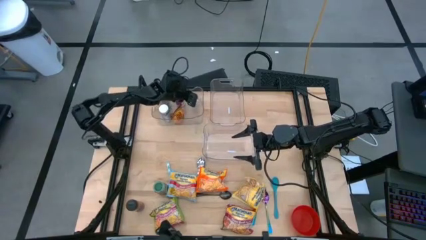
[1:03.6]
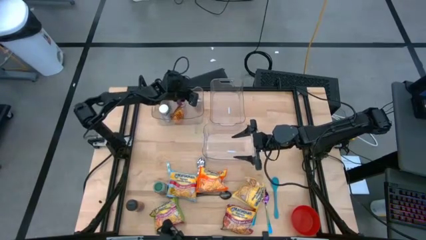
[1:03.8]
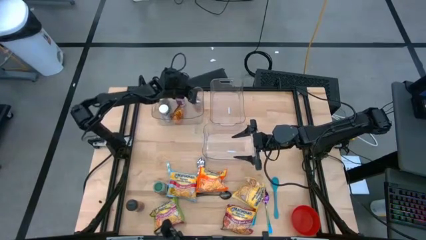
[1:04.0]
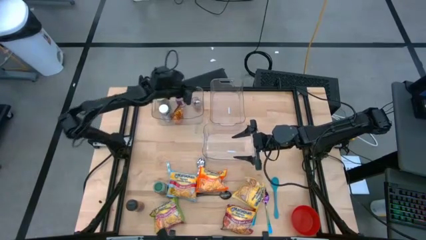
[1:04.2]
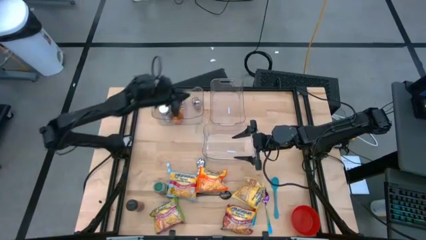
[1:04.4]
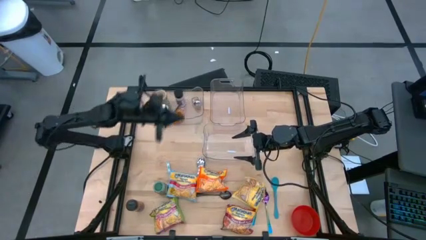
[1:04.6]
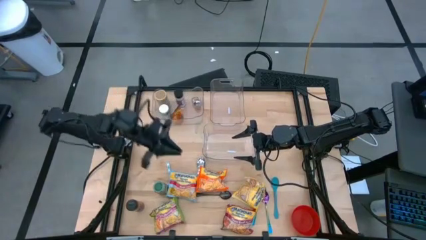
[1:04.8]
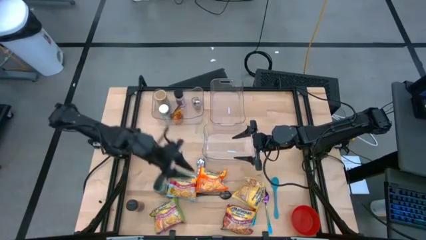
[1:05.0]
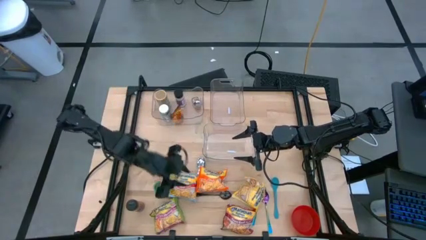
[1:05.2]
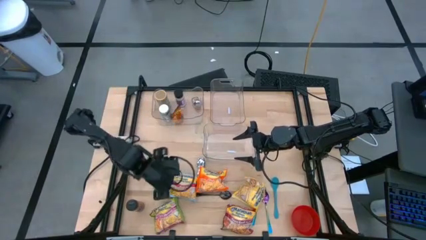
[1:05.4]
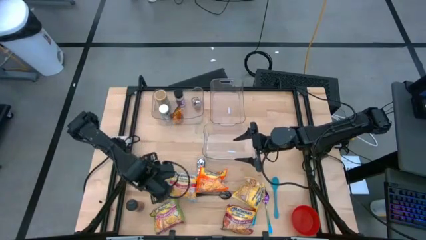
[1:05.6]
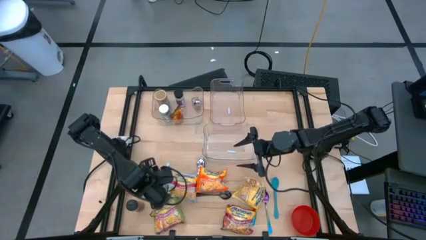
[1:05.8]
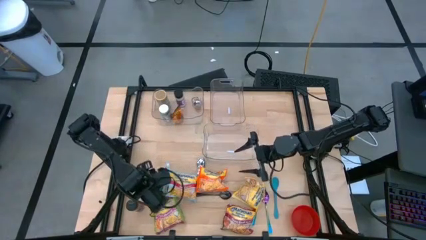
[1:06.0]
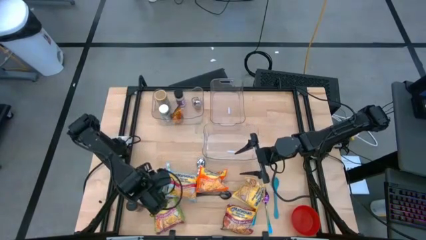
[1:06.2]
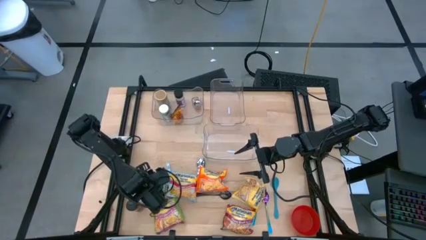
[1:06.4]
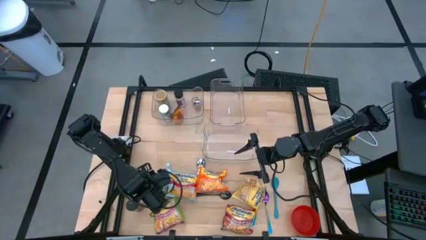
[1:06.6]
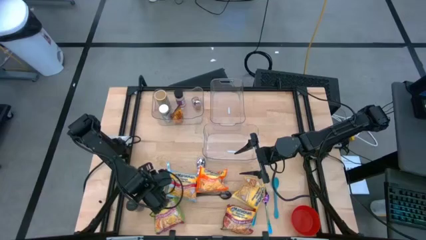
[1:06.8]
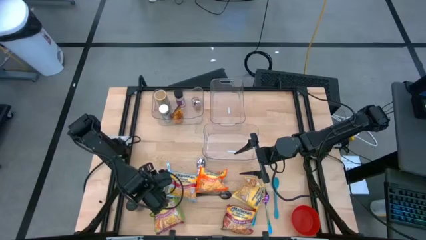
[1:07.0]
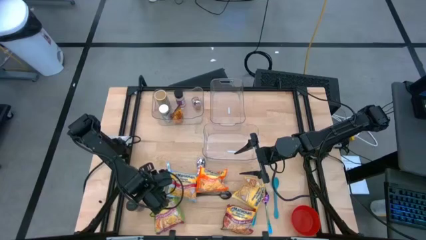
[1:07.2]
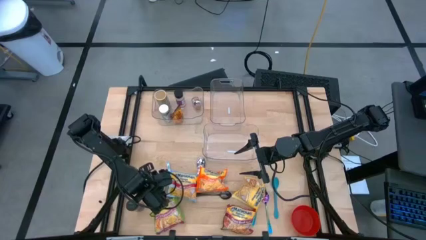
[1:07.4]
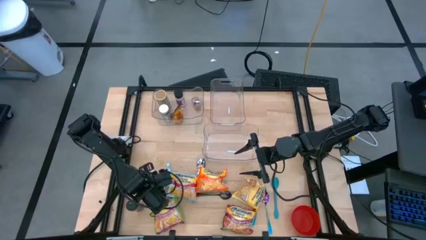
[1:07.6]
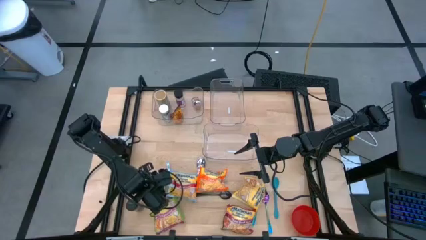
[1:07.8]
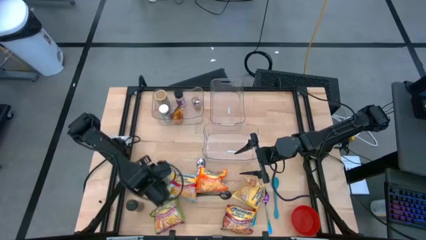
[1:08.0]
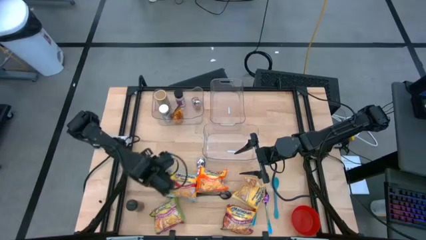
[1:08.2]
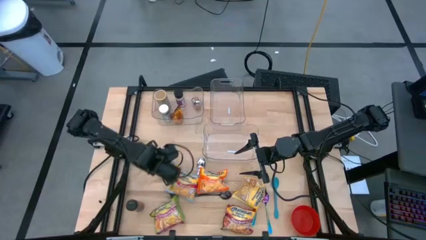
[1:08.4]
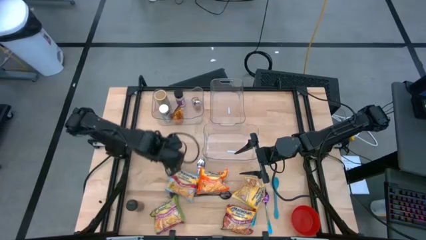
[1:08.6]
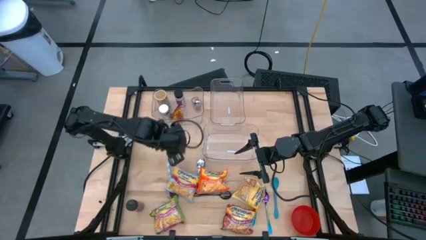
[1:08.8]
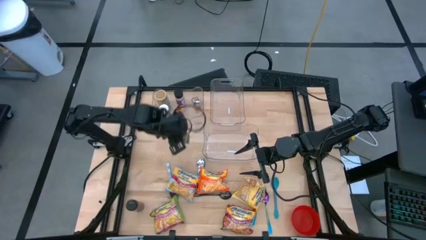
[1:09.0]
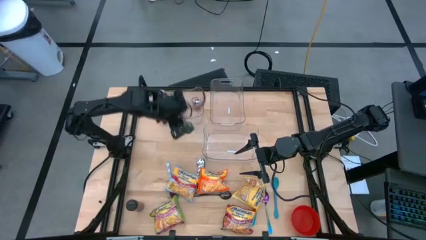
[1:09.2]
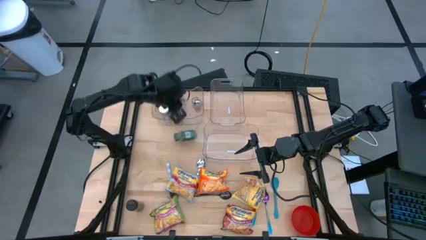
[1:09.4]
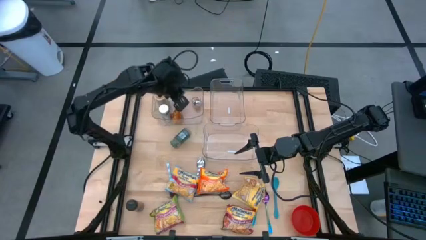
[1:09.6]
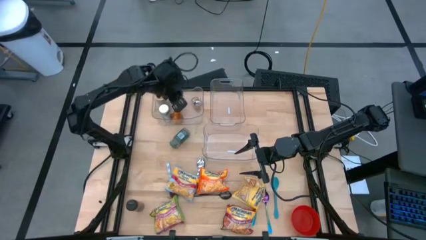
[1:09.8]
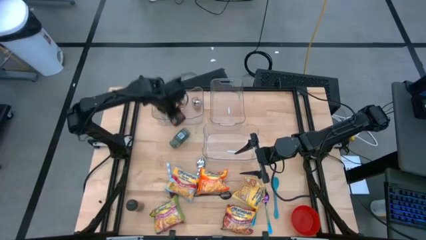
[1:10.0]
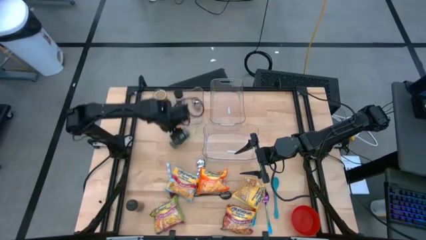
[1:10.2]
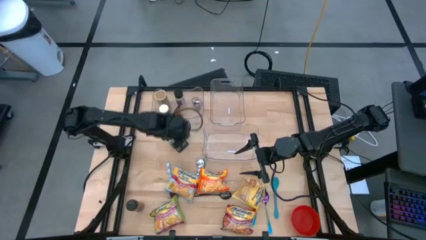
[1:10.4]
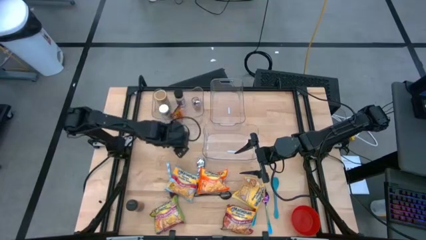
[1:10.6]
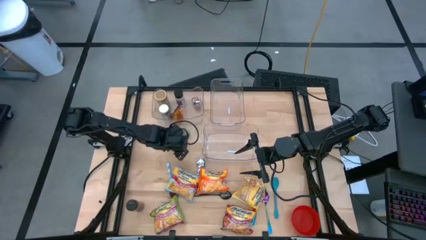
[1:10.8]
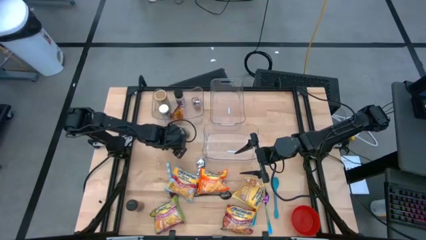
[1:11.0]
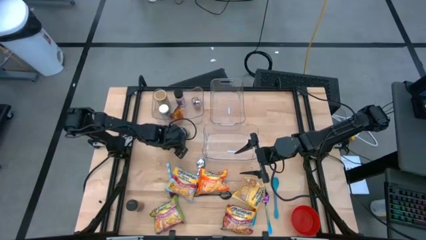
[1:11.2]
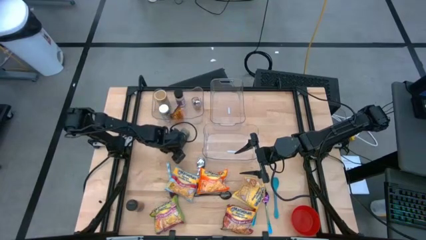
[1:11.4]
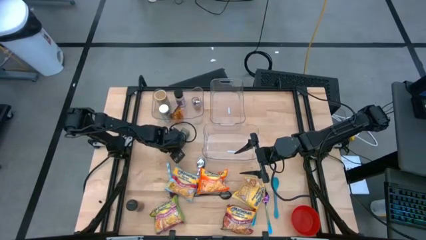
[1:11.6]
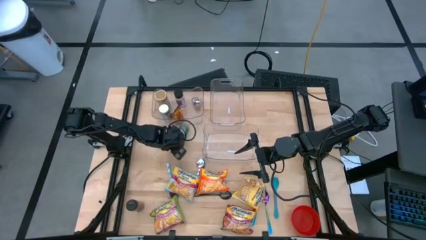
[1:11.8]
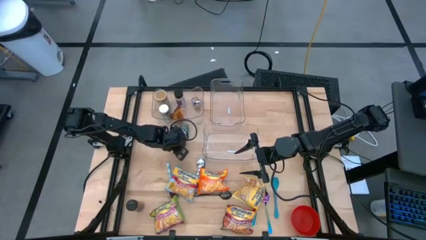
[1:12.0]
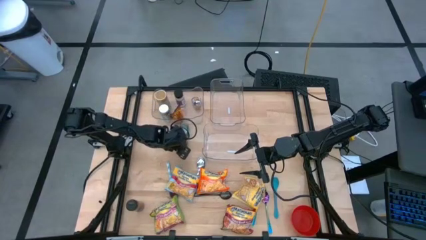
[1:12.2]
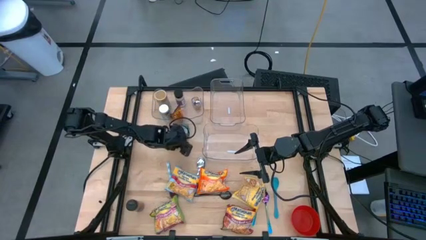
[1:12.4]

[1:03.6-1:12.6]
Task: Pick & Place Food Item
Put the green seasoning bottle into the top left transparent container

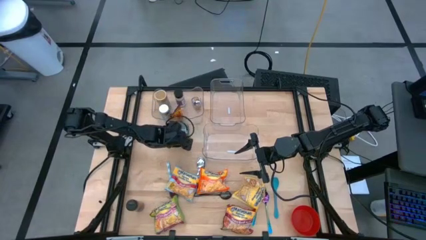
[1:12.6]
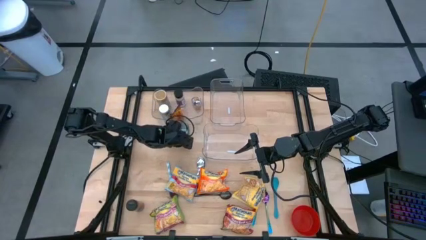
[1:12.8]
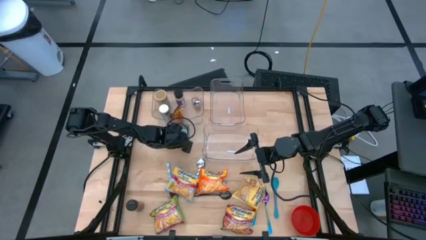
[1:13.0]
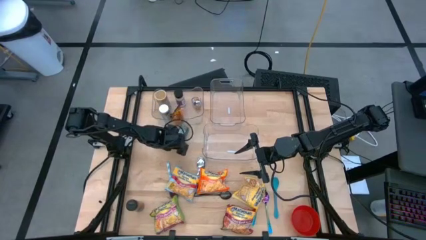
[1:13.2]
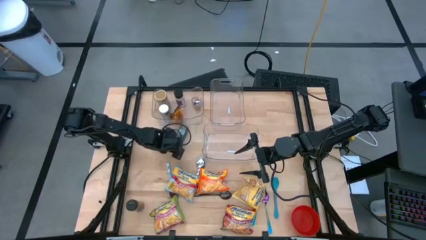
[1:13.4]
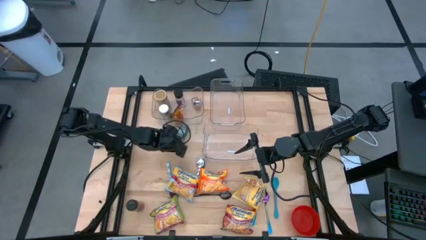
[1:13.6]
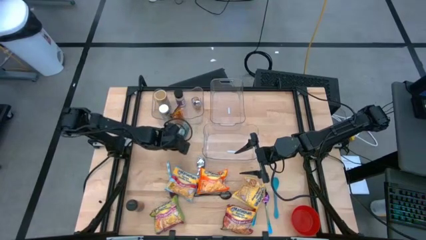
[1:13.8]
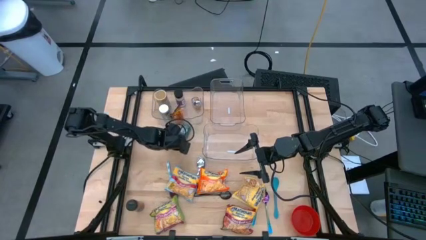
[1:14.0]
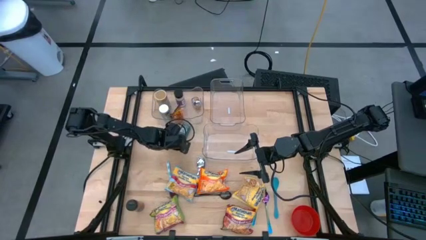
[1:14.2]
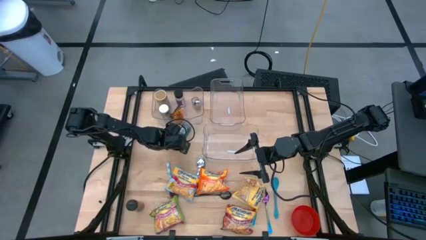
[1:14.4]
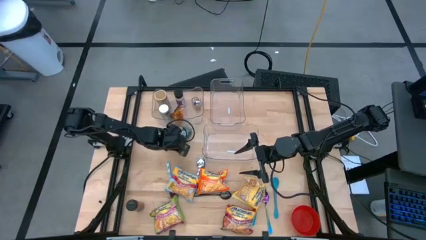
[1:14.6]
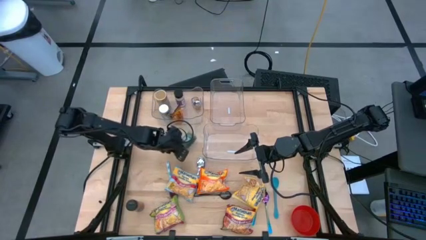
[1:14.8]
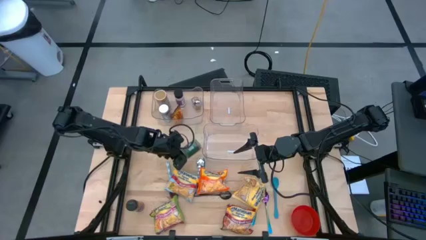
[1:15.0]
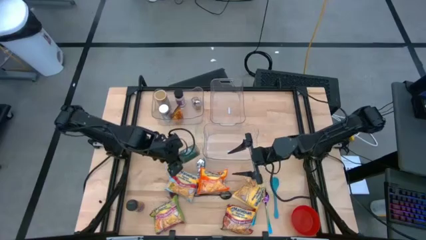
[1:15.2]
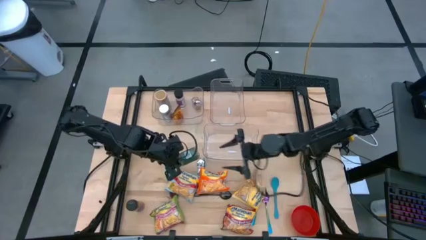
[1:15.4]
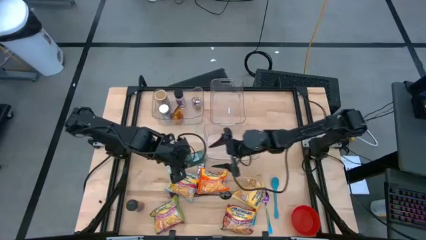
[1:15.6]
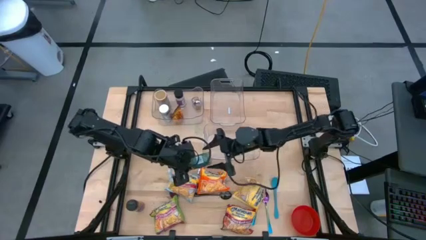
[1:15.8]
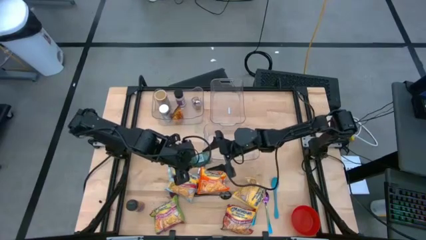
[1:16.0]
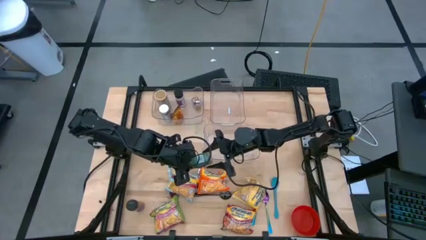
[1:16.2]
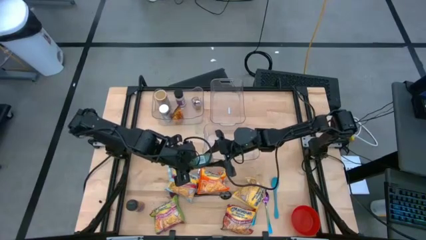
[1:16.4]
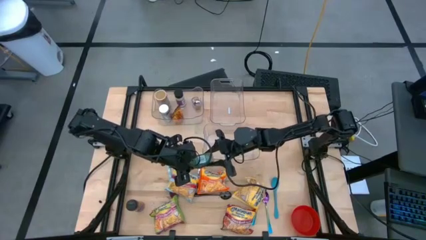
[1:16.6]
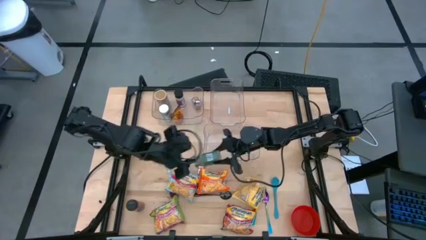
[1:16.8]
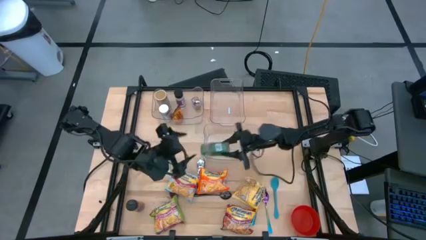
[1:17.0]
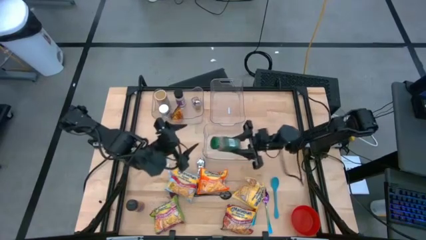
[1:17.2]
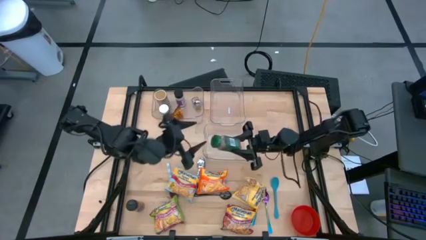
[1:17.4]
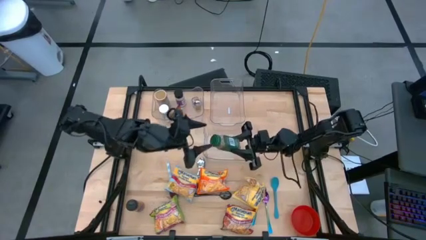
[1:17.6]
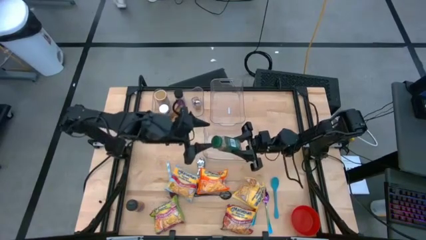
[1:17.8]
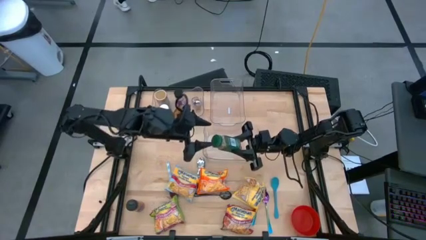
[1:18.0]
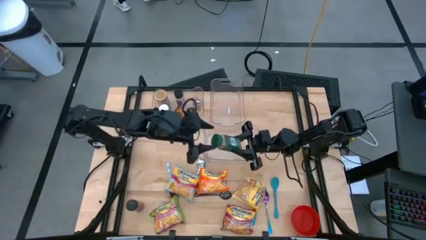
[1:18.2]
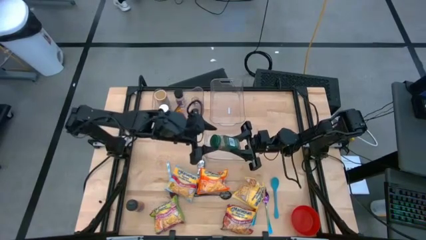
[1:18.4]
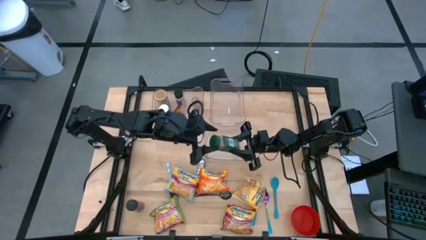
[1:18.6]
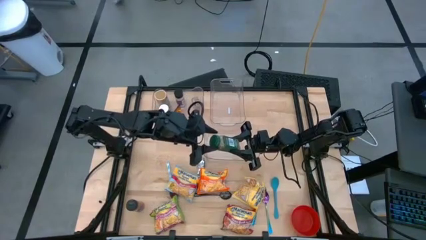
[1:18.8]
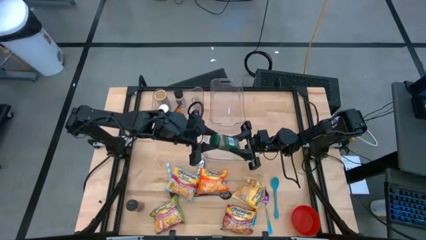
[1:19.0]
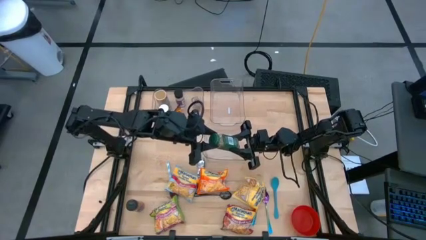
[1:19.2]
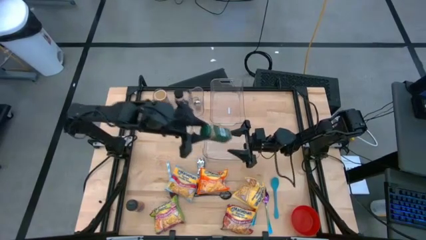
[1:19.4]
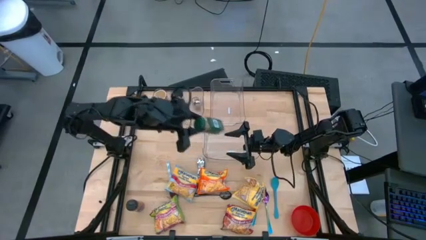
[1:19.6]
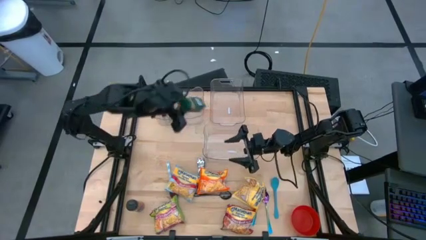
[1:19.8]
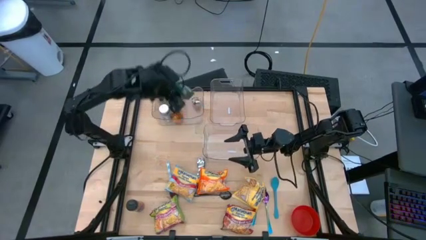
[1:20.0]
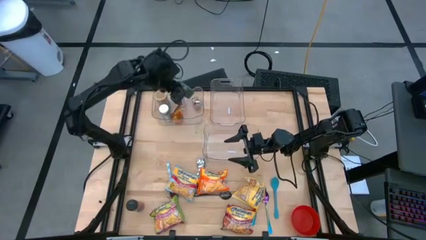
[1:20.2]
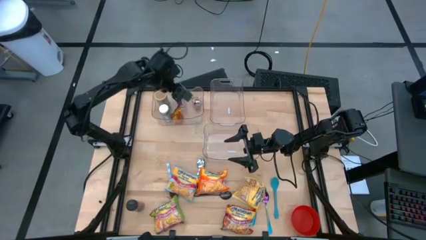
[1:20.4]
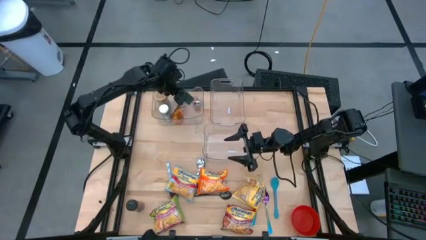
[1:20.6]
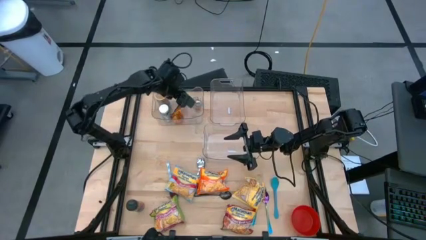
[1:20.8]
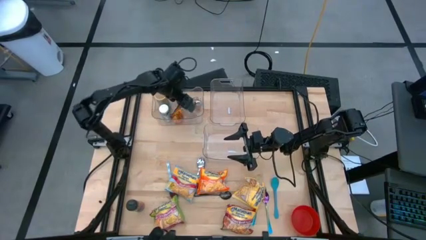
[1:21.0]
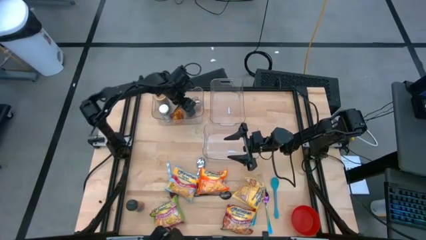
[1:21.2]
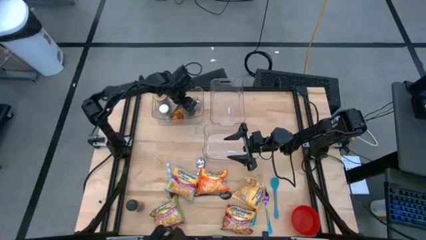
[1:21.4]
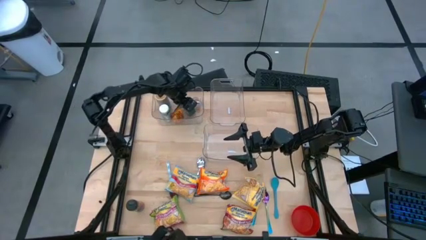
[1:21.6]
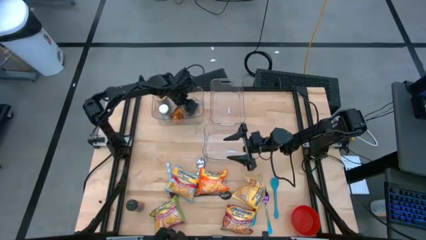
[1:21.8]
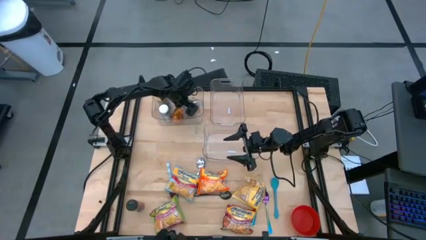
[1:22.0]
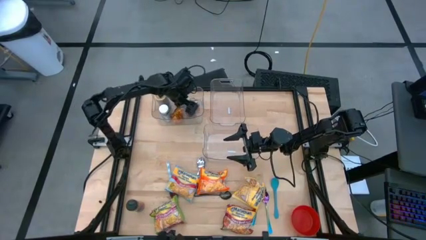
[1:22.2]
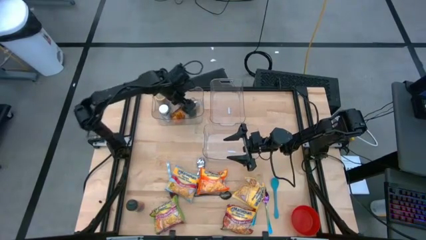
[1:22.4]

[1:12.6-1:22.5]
Put the green seasoning bottle into the top left transparent container
